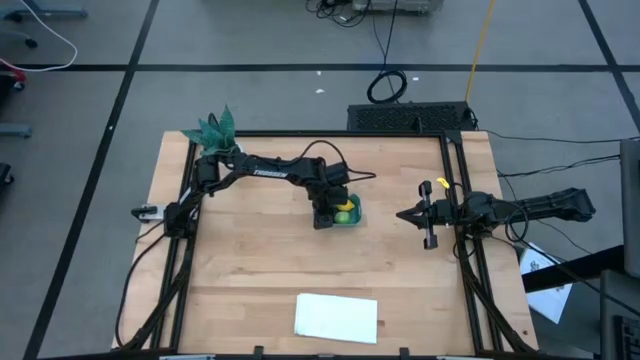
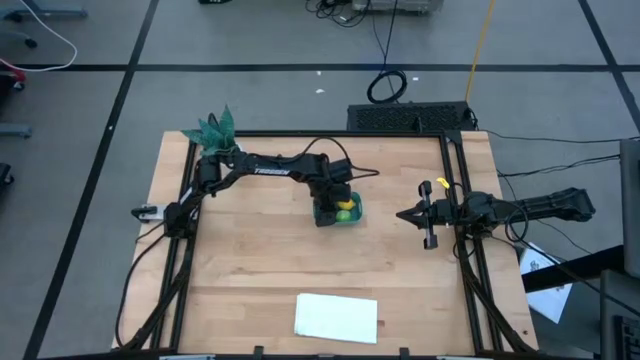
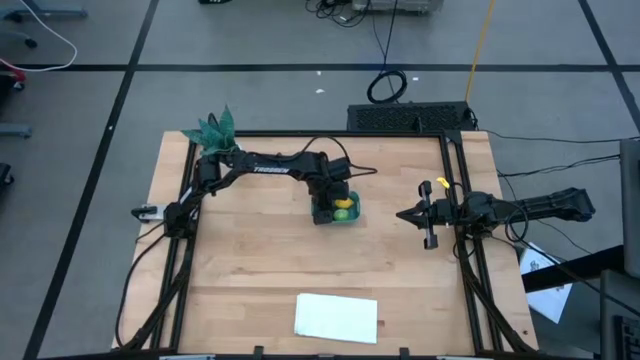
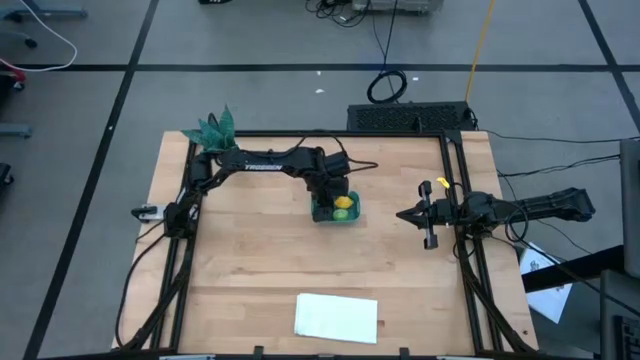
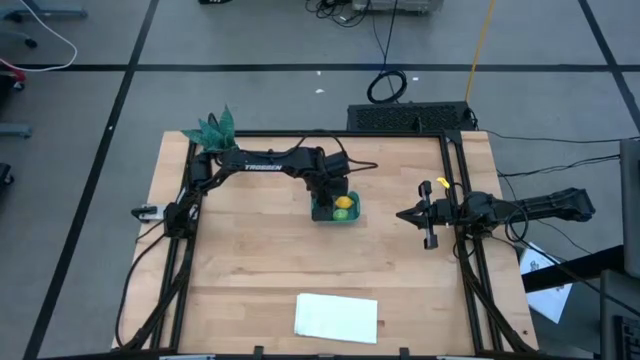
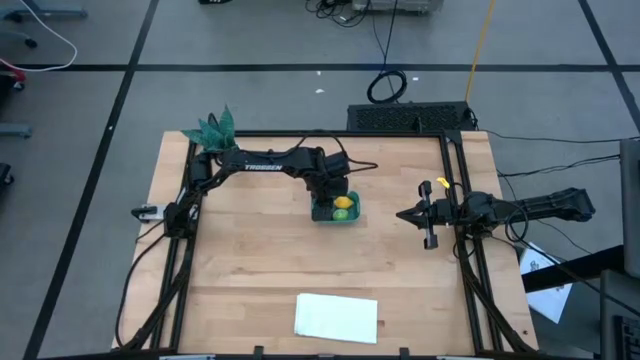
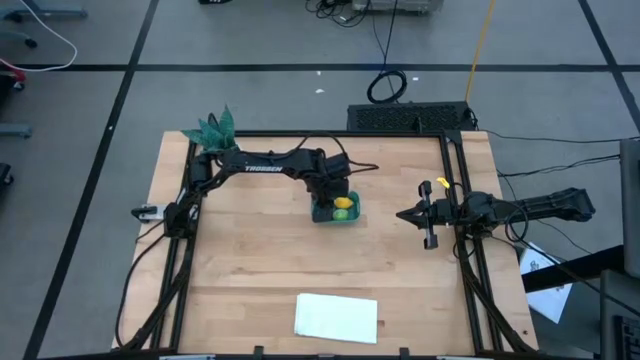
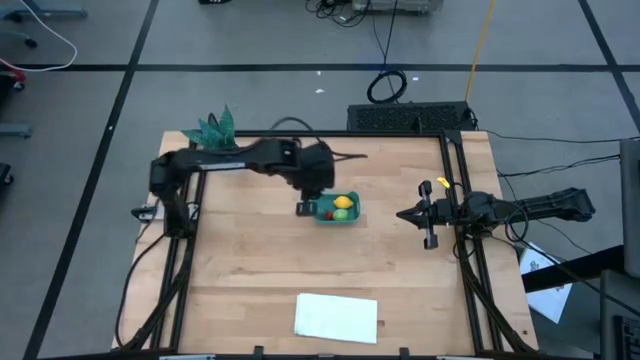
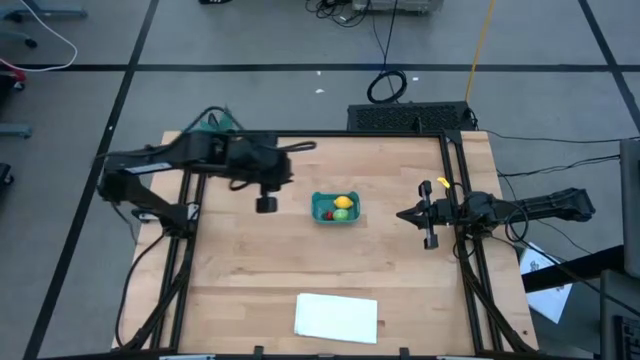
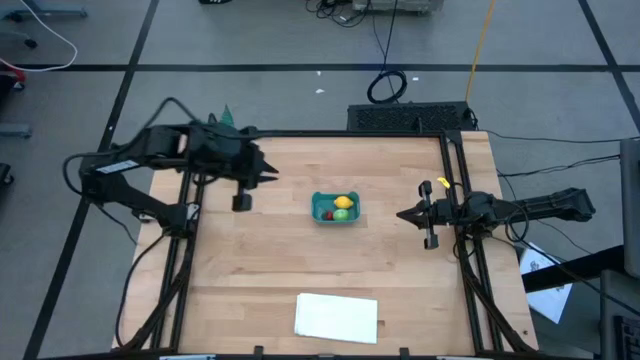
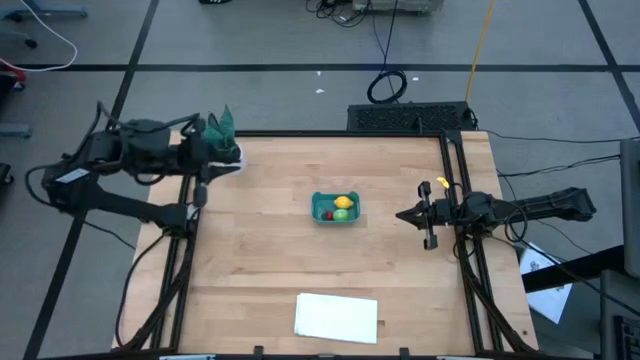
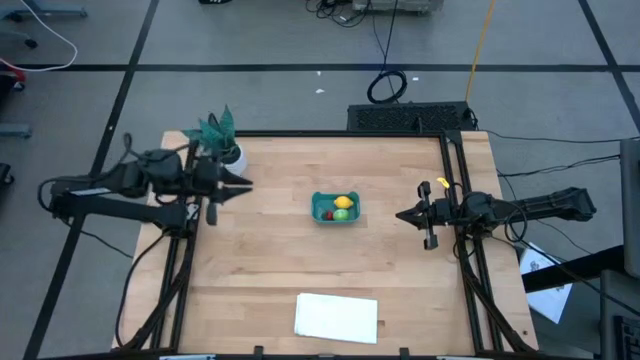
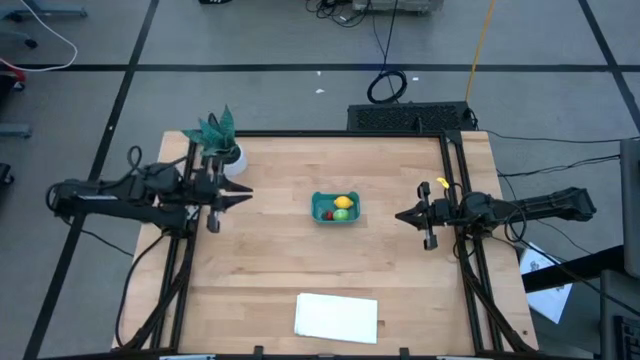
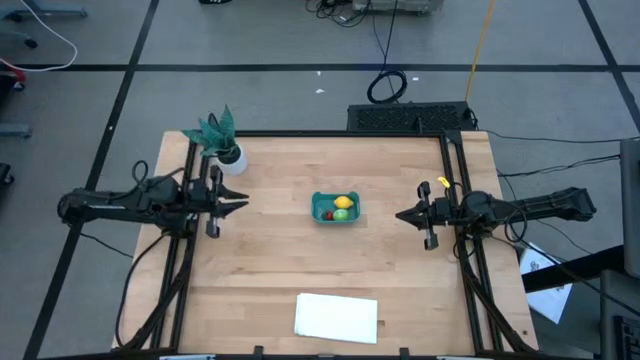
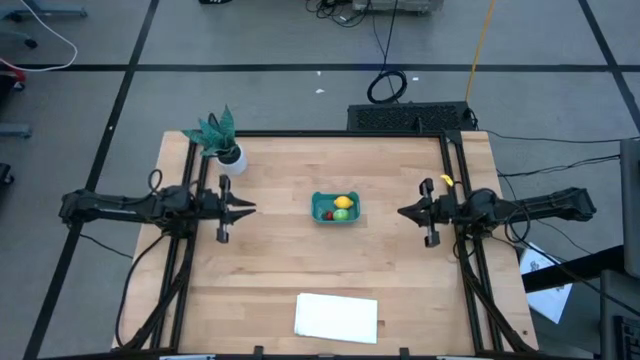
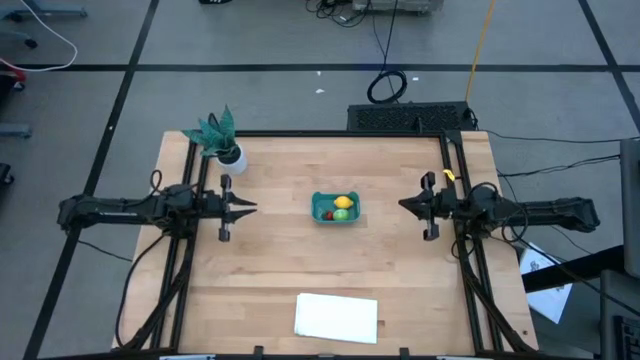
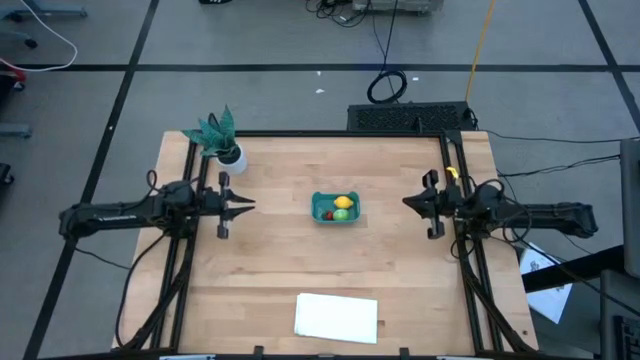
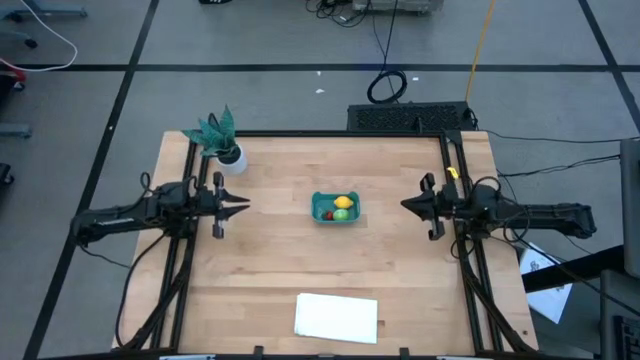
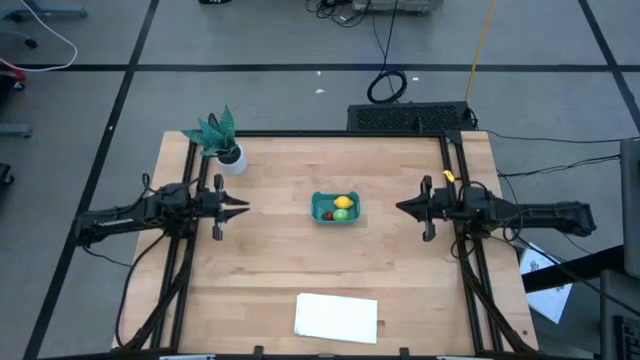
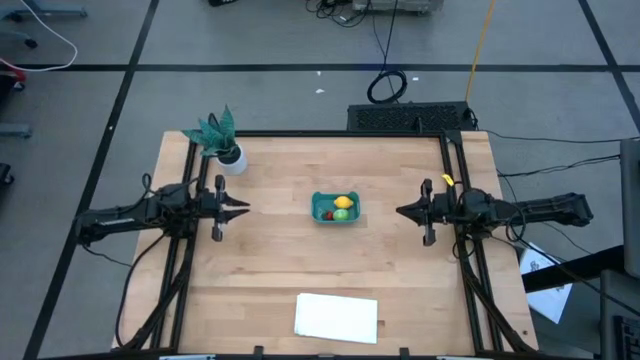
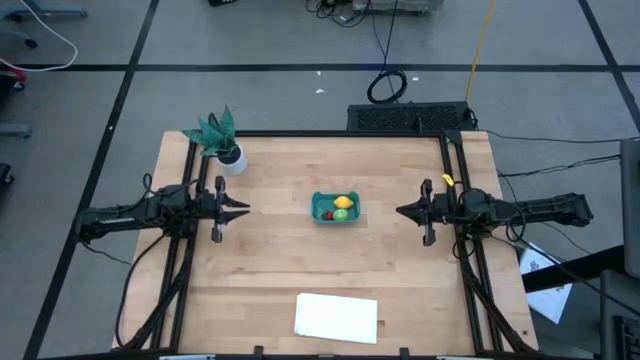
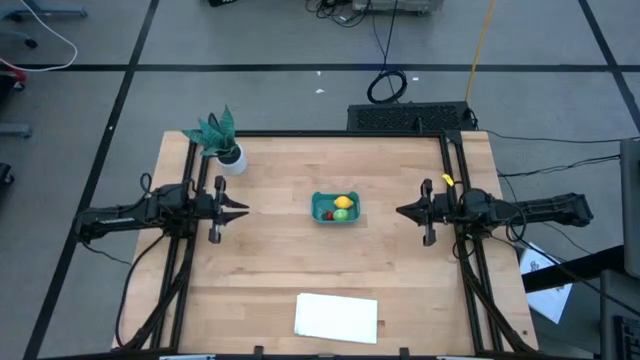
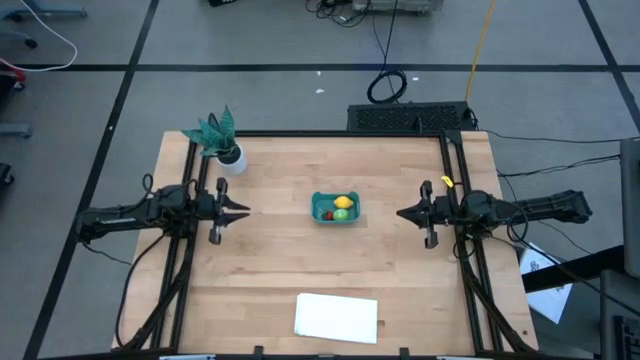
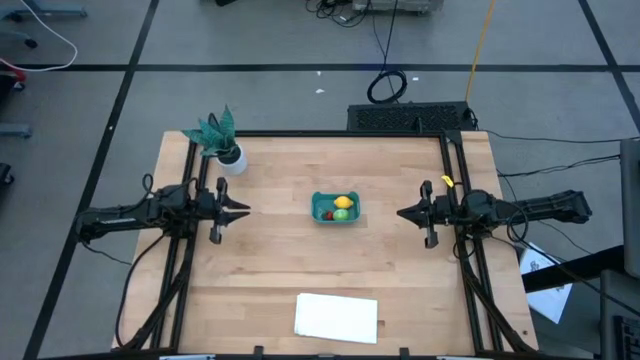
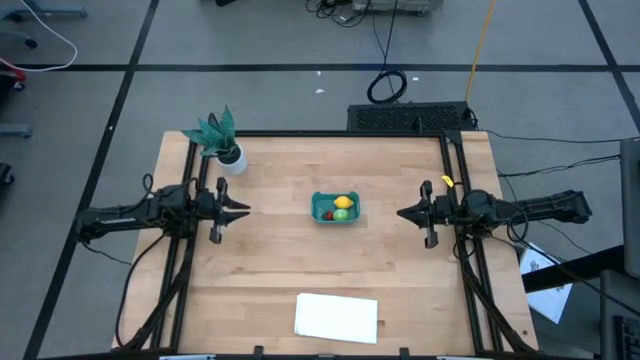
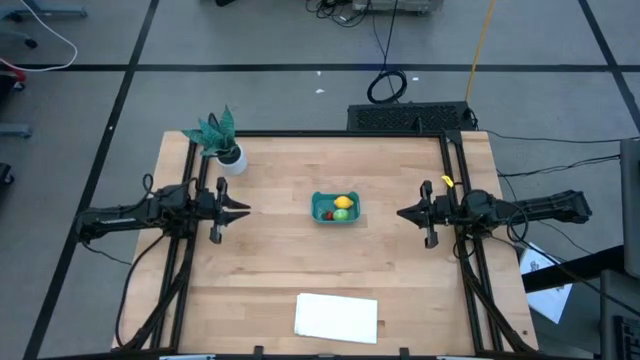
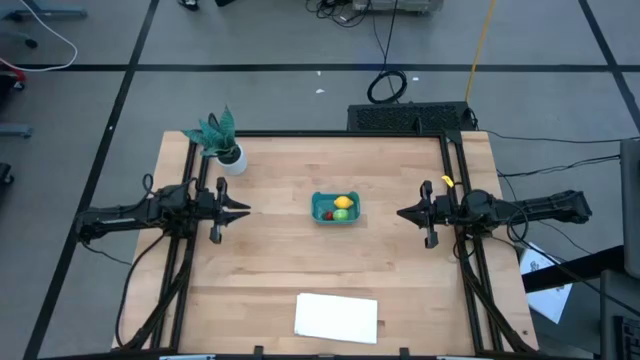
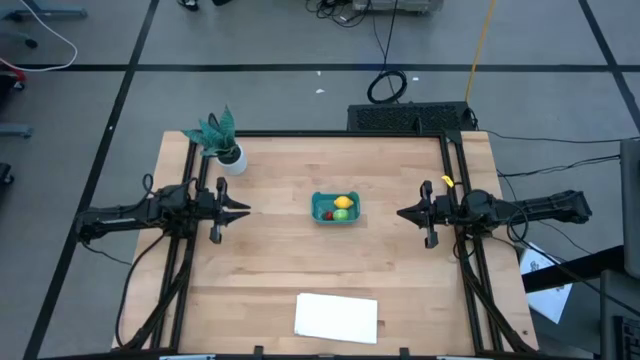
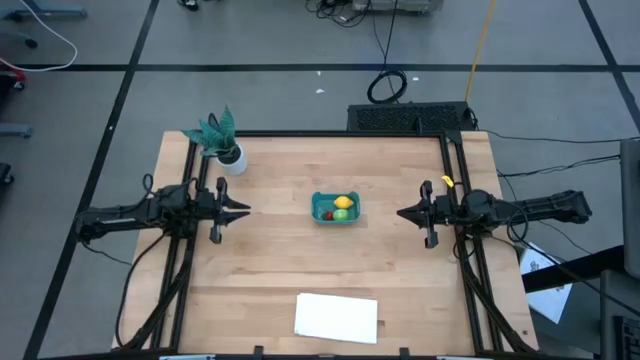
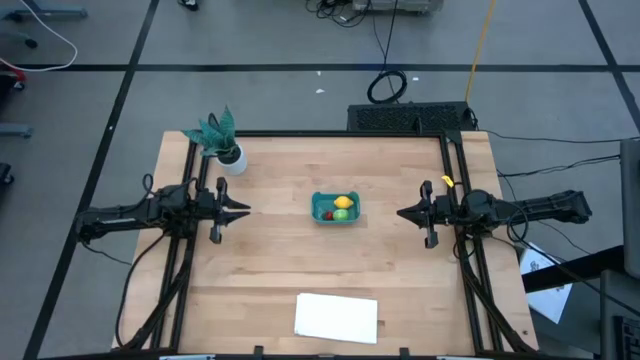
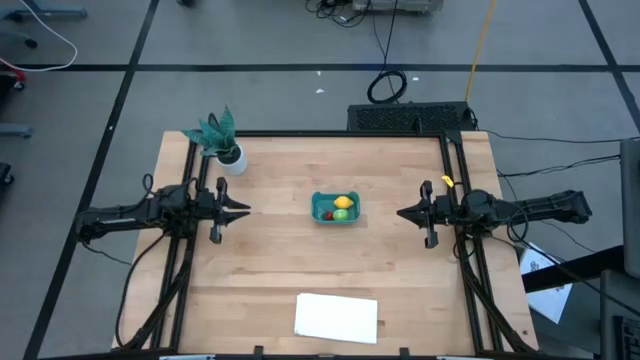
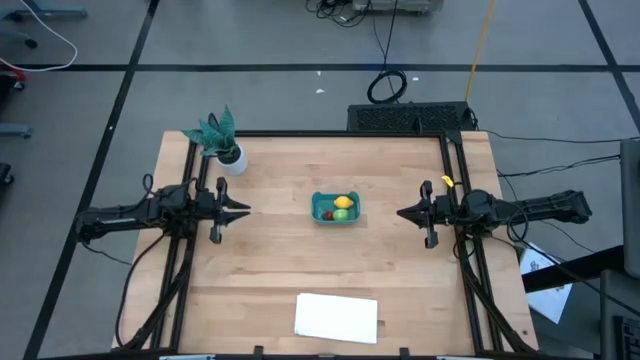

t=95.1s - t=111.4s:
Task: Pick and placing Produce into tupperware
Return to Home Position

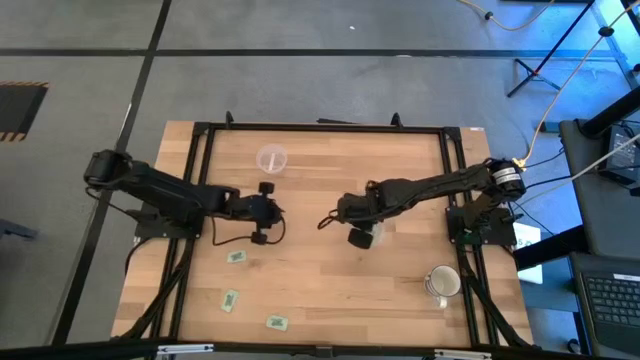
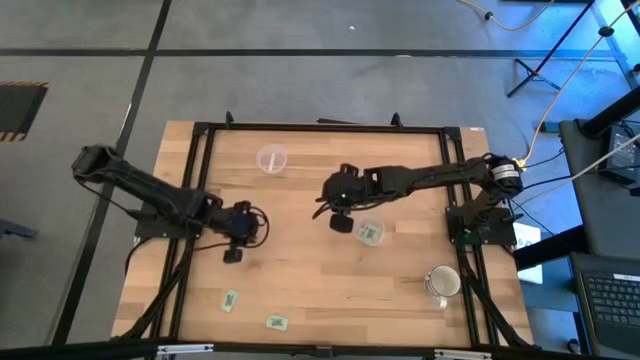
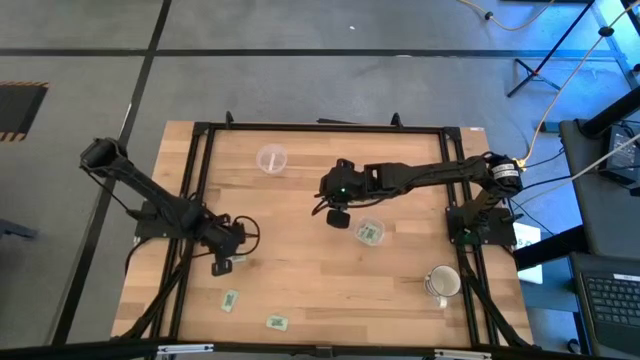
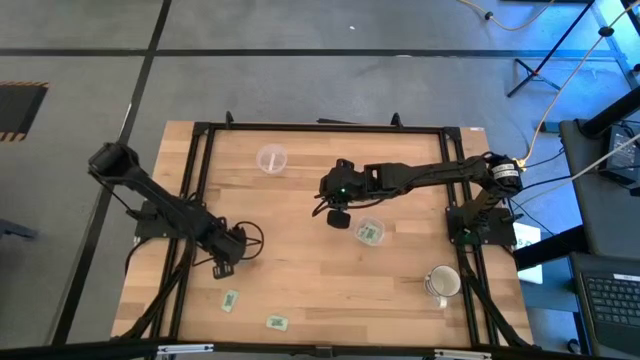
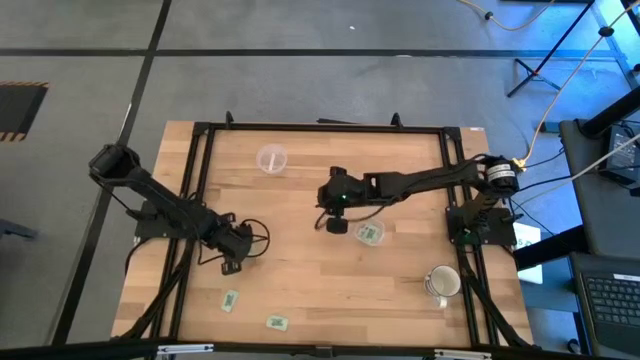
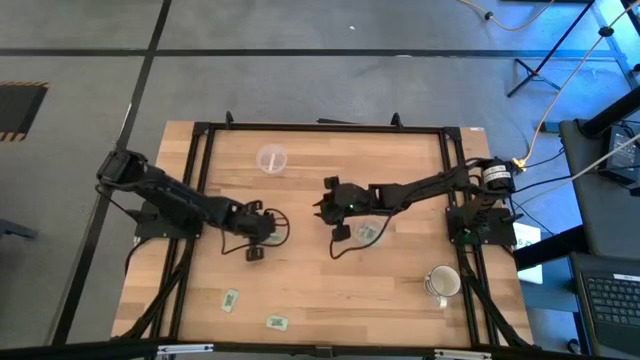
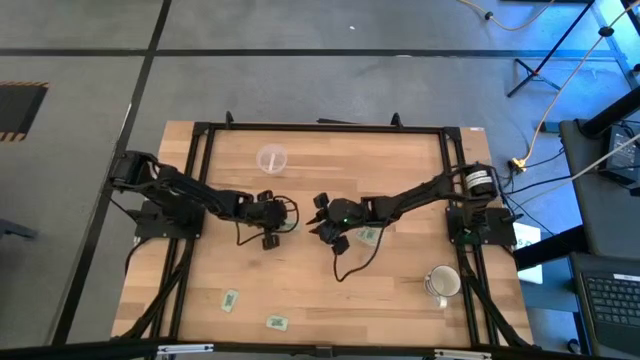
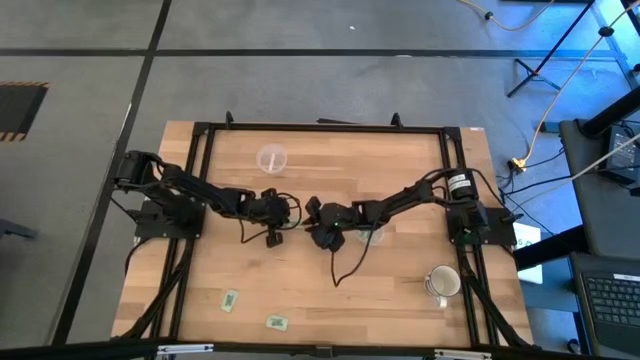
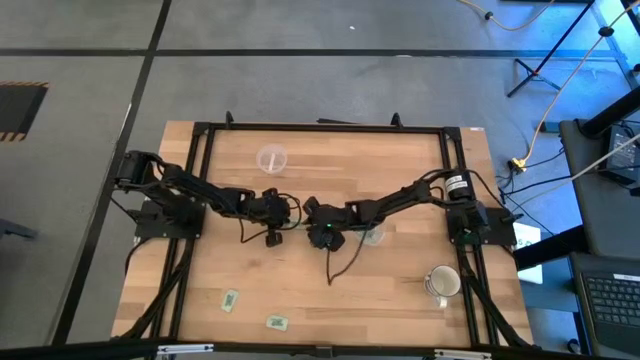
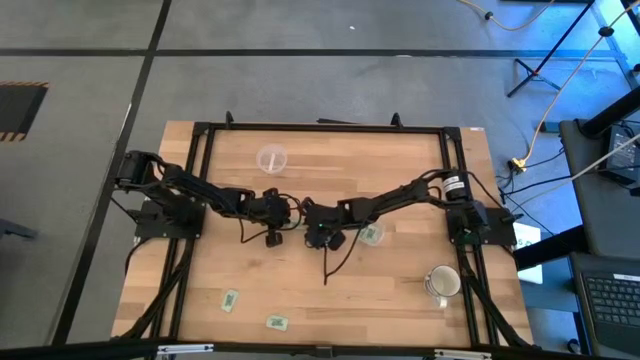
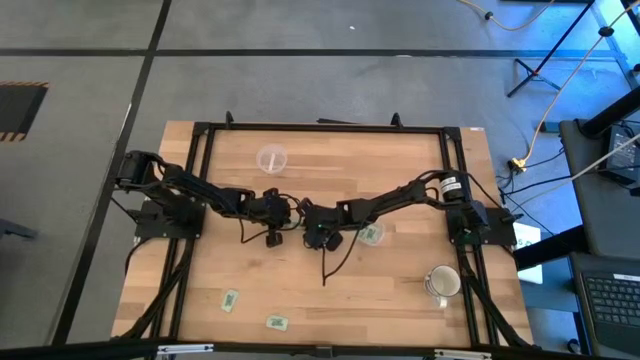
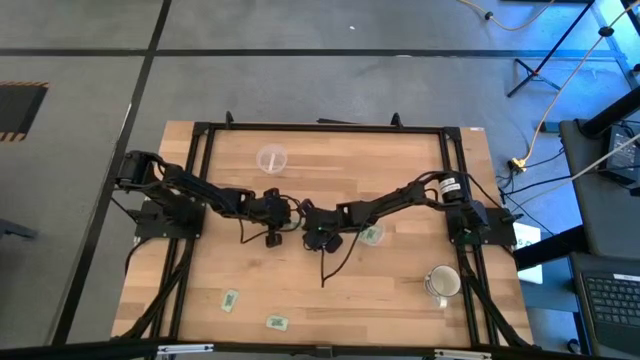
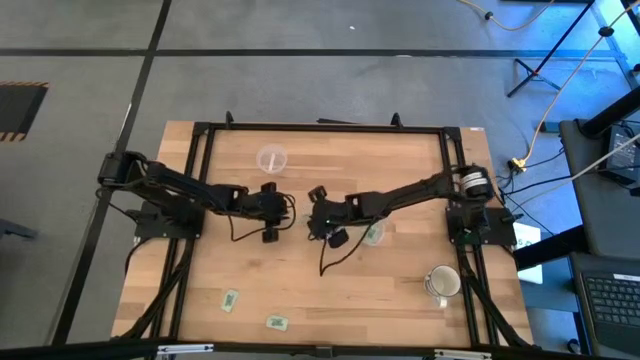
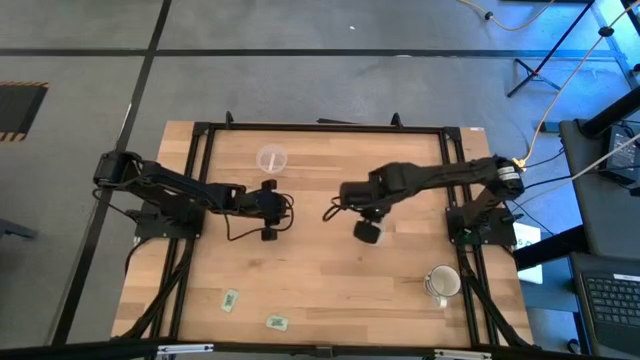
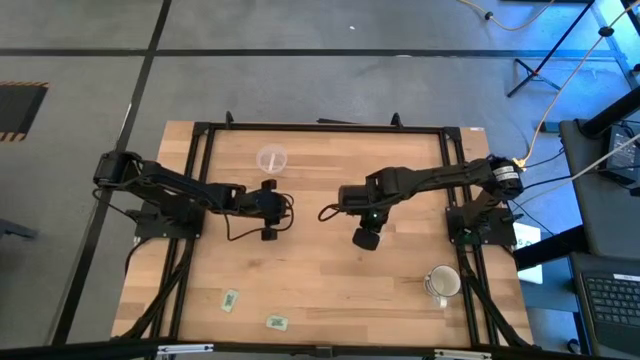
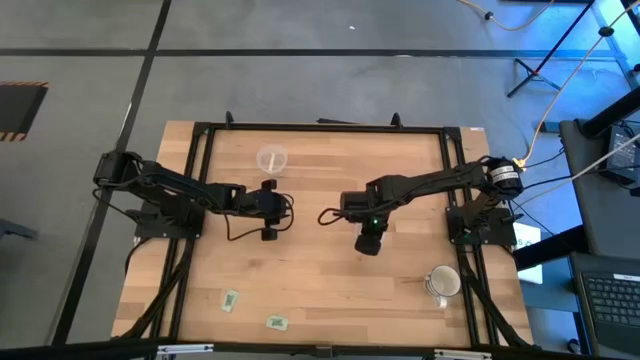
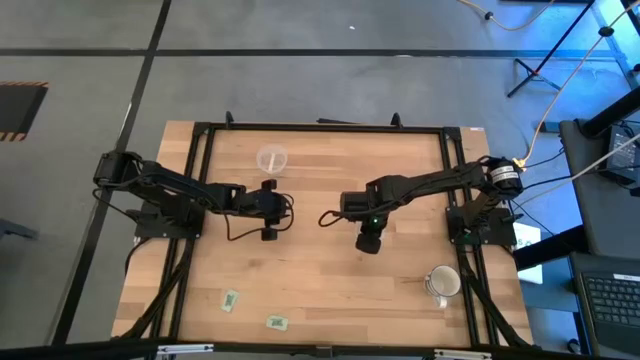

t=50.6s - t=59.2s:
Task: Pick and place Stevia / Truvia into bins
Put the stevia packet into the bottom transparent container
